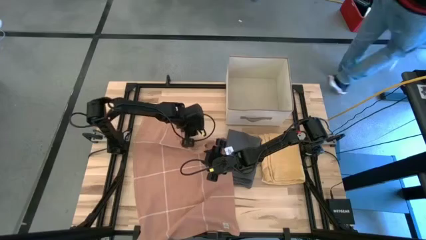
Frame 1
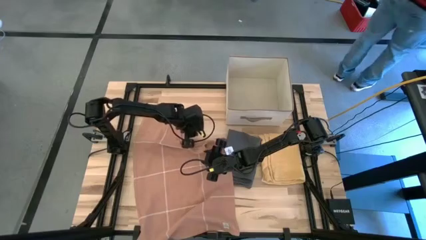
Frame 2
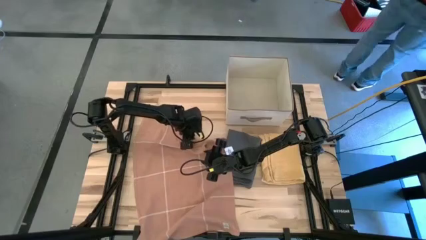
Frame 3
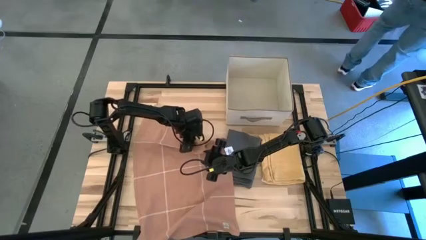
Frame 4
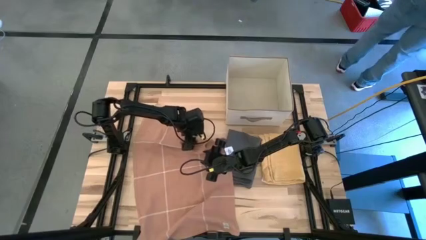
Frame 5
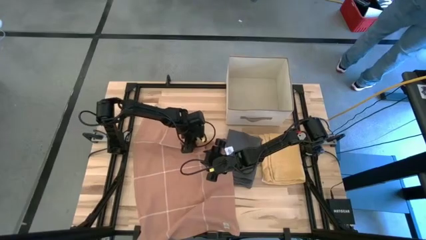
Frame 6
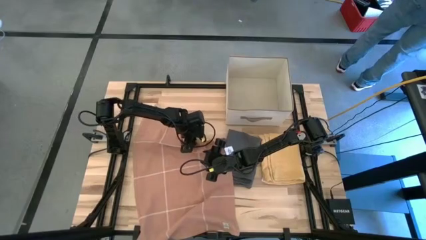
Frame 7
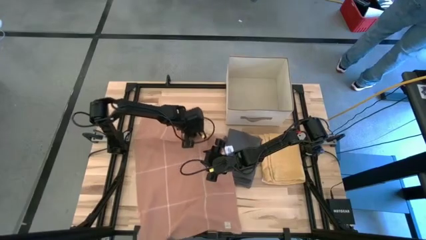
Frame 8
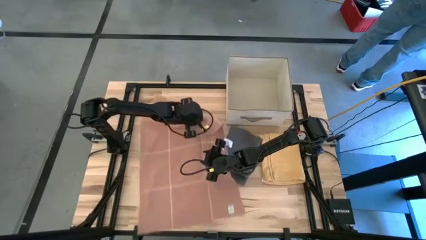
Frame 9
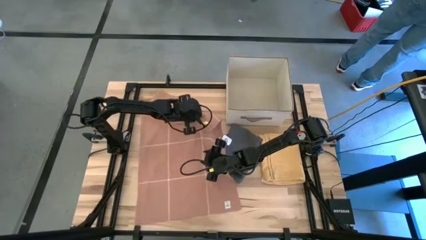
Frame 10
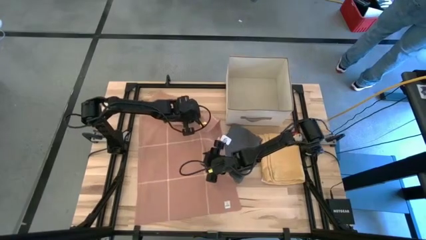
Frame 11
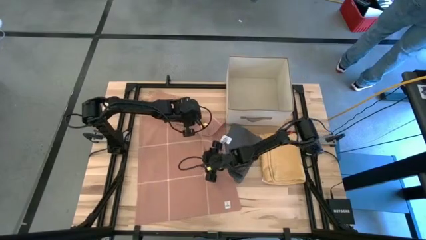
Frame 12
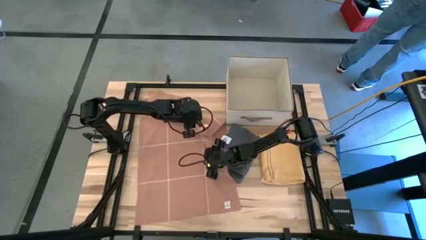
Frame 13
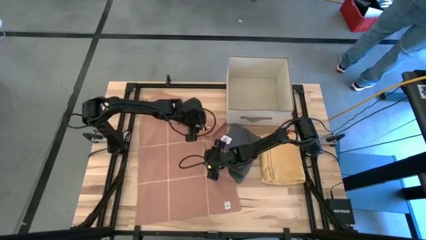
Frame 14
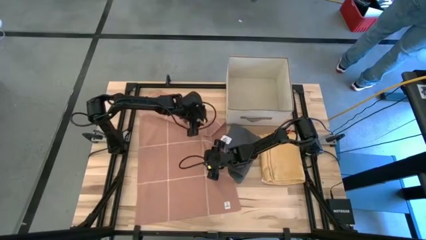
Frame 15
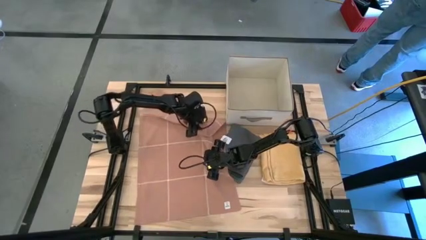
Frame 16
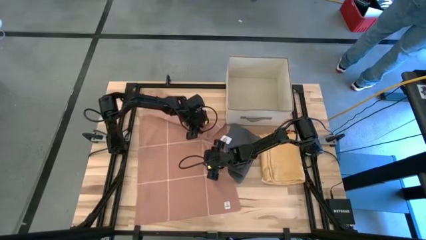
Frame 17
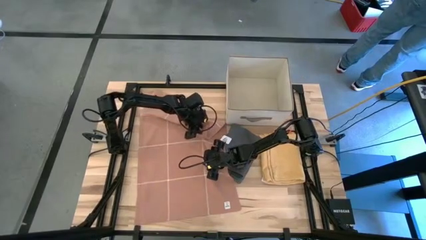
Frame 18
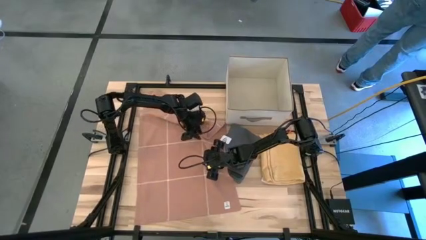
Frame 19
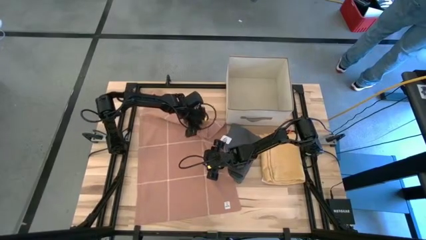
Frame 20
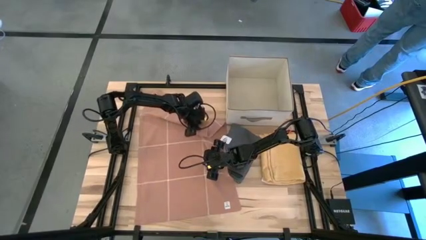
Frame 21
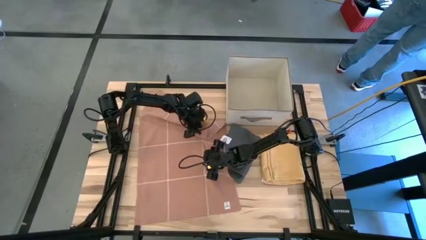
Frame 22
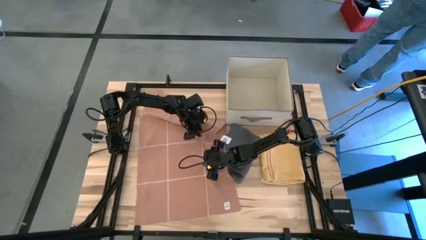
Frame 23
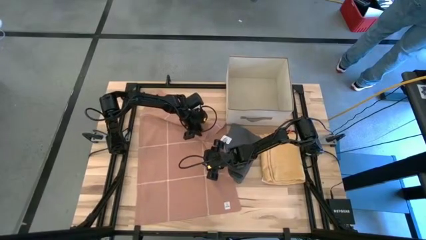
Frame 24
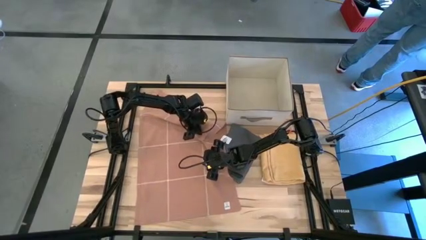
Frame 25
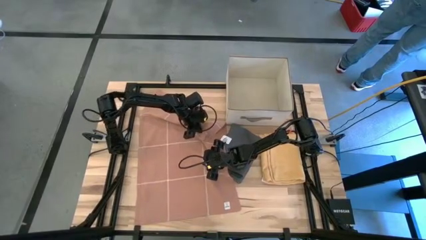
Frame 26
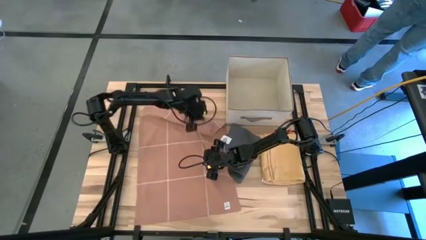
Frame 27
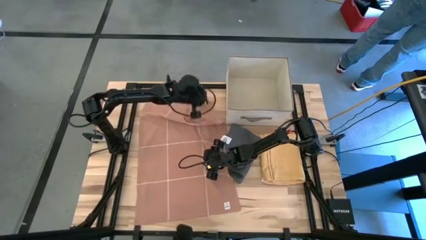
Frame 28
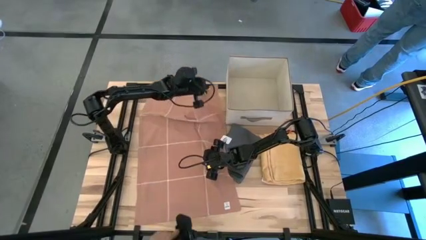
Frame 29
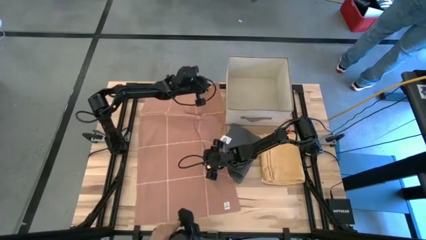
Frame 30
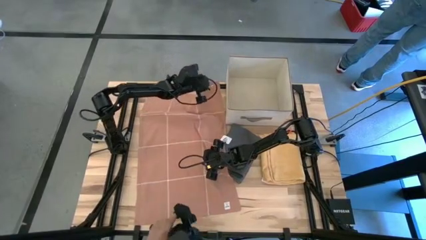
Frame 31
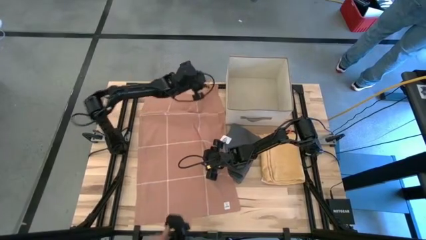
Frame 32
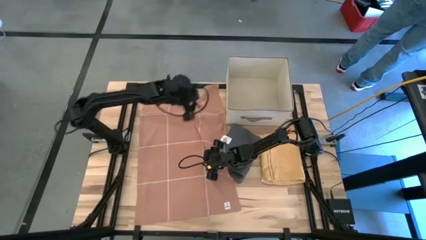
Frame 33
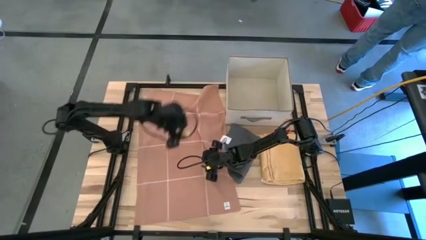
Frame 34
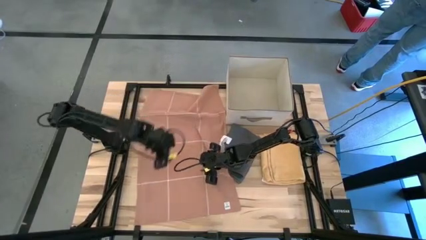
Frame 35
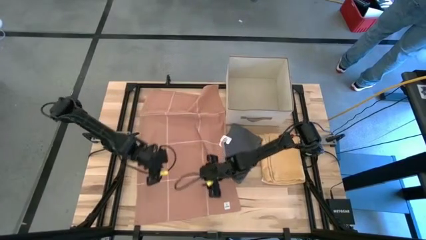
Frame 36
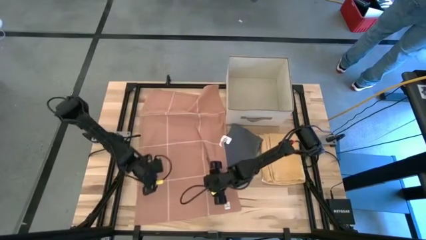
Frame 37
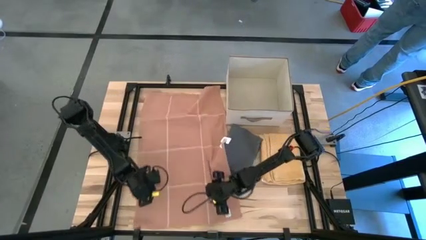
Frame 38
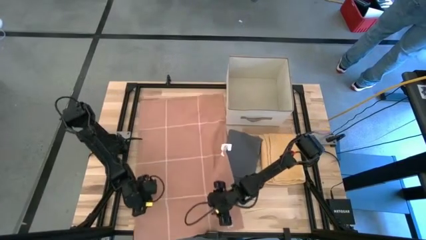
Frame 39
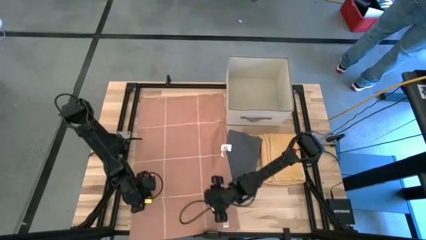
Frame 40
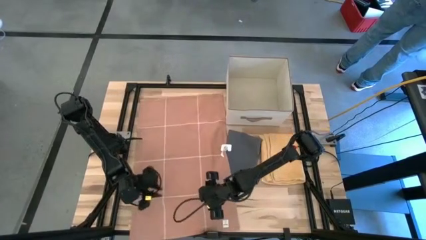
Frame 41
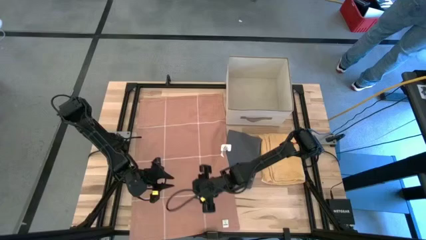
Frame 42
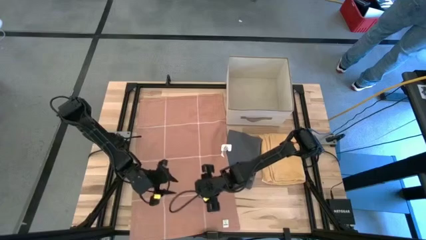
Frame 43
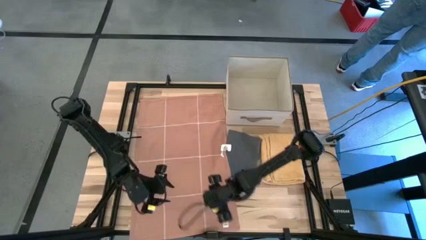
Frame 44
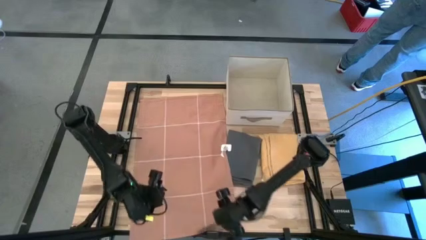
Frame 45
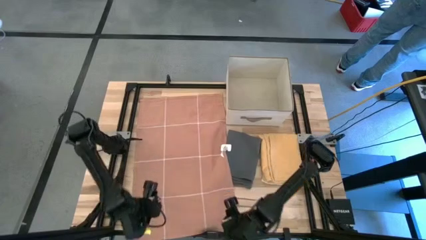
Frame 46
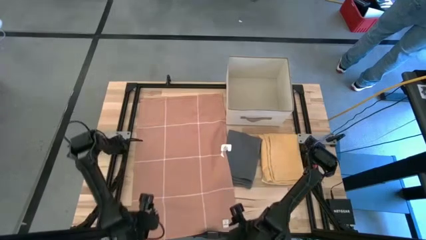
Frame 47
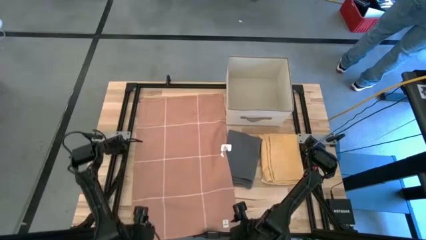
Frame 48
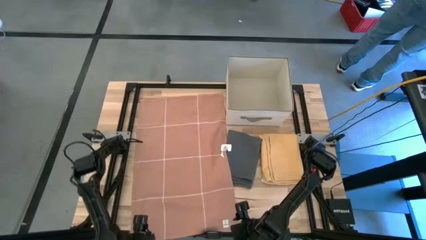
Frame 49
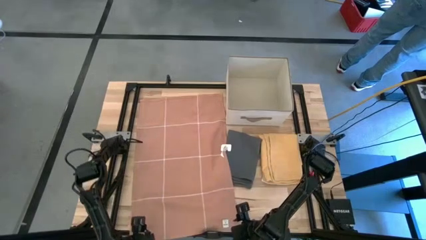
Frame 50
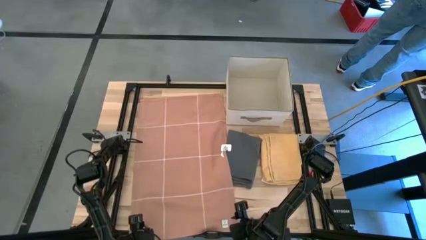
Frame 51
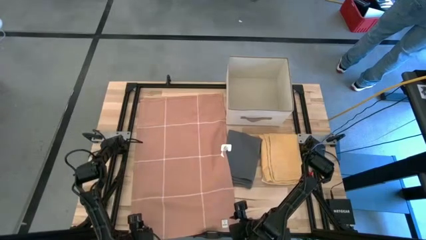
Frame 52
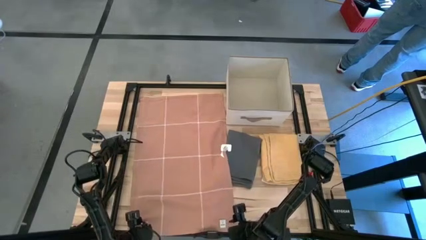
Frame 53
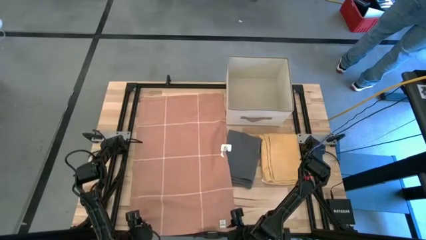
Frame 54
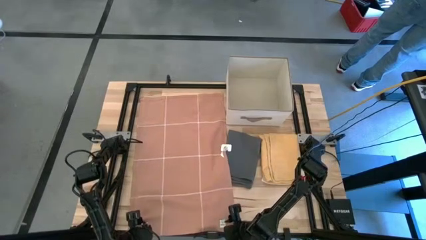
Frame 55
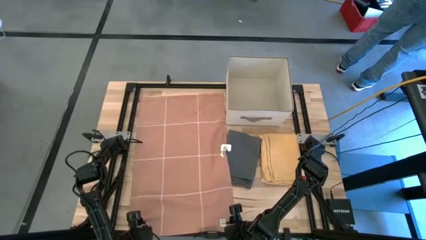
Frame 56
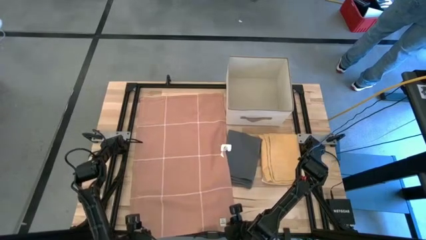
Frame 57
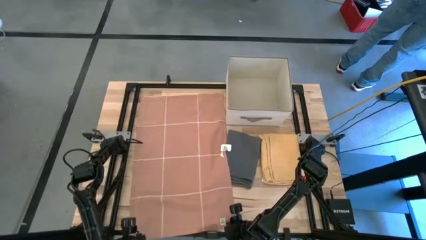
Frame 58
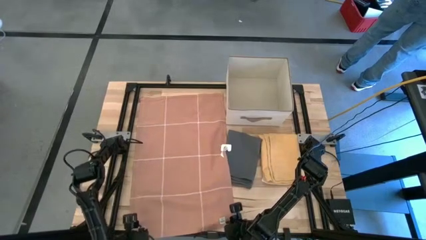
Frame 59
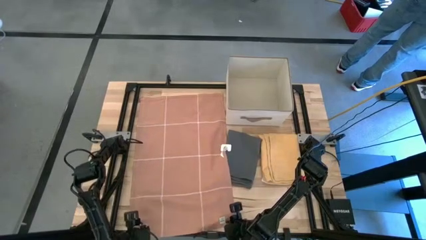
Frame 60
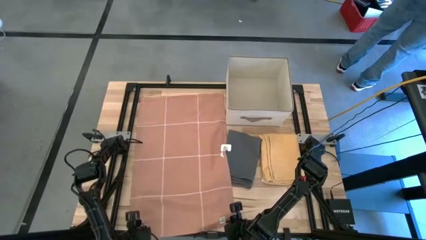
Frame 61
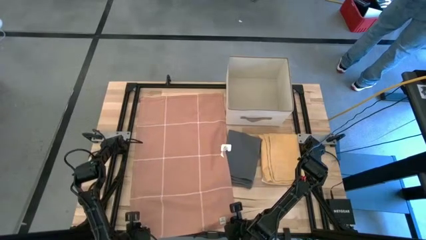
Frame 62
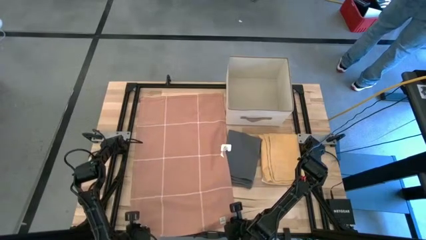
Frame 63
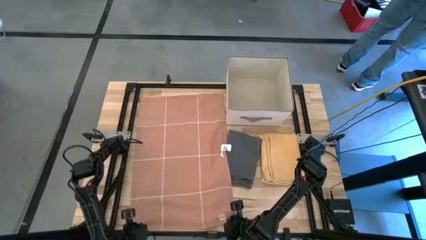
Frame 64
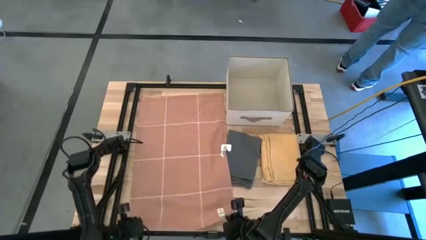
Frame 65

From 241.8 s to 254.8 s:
Task: Fold towel
Fold the brown towel

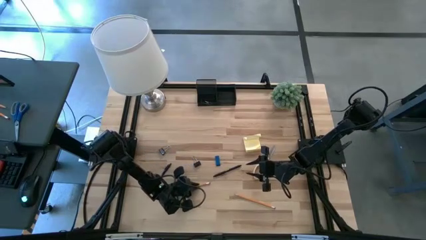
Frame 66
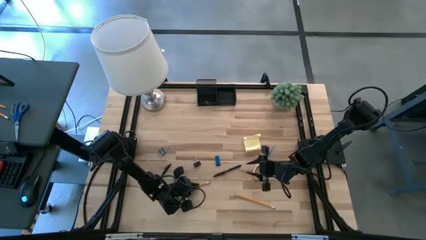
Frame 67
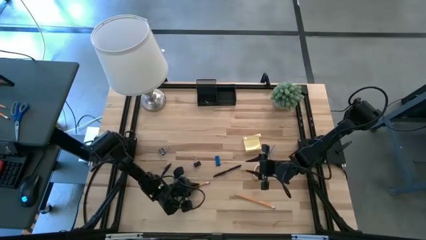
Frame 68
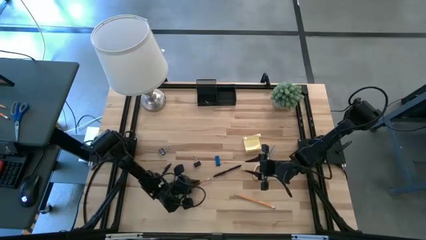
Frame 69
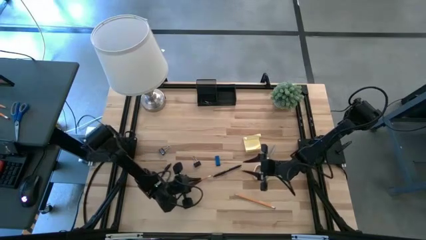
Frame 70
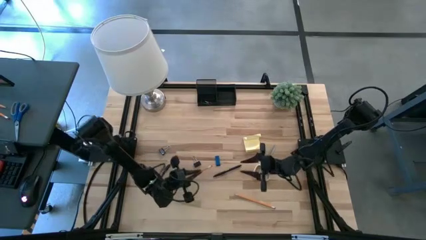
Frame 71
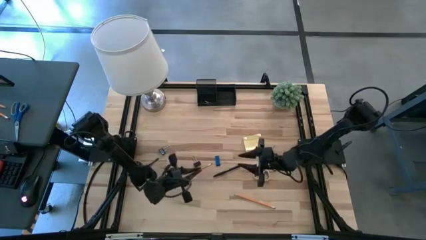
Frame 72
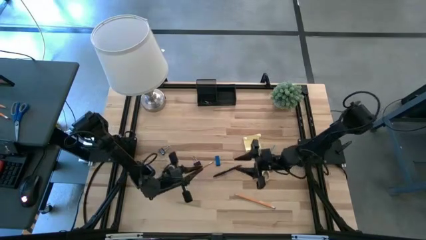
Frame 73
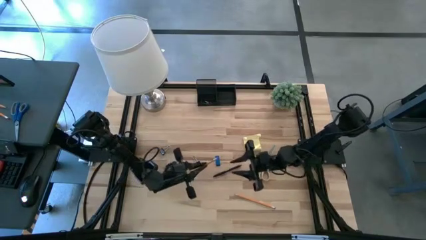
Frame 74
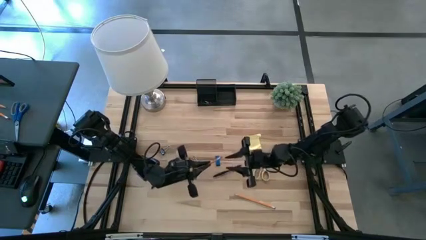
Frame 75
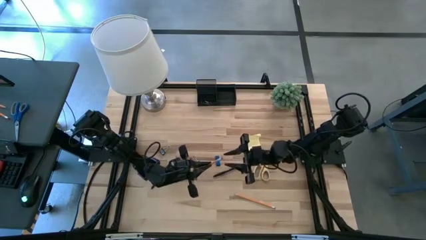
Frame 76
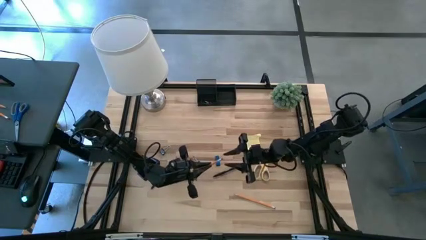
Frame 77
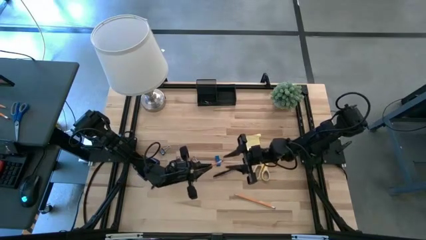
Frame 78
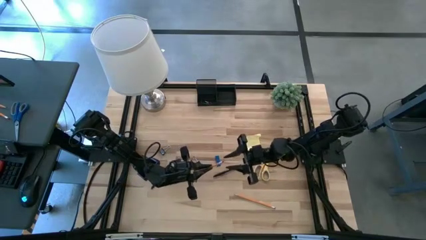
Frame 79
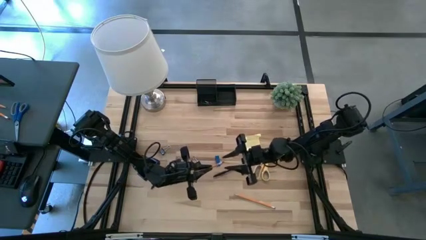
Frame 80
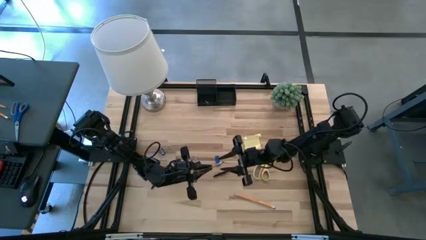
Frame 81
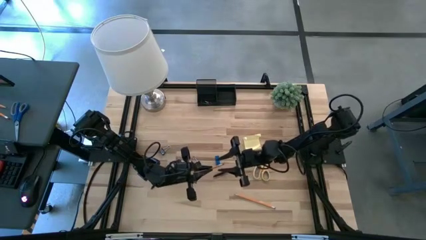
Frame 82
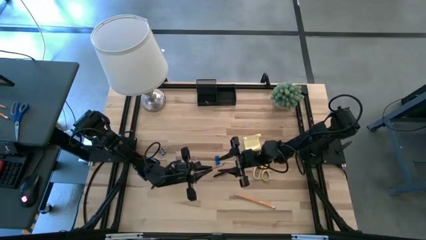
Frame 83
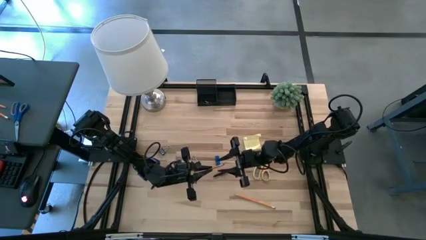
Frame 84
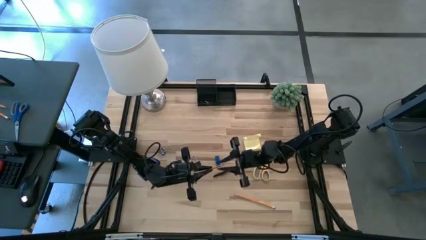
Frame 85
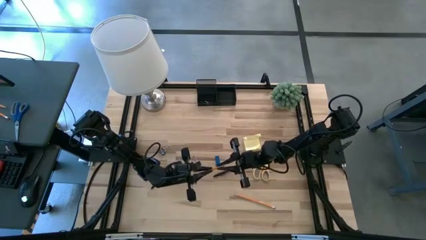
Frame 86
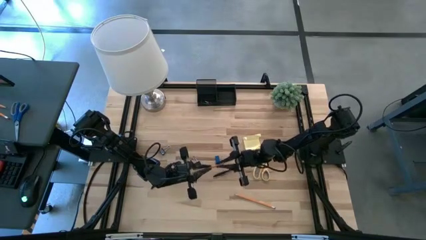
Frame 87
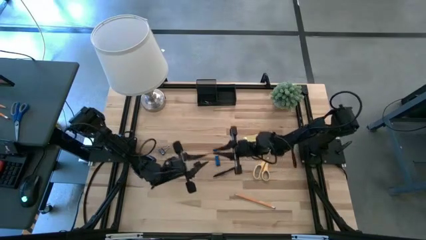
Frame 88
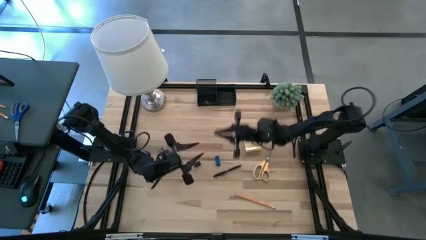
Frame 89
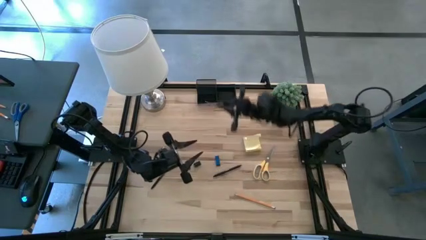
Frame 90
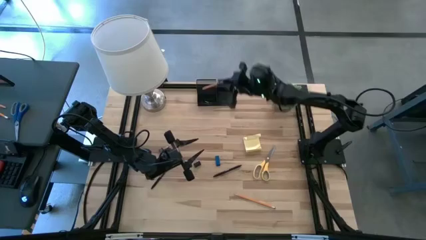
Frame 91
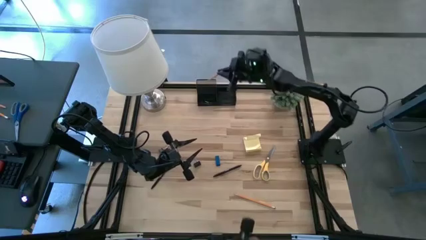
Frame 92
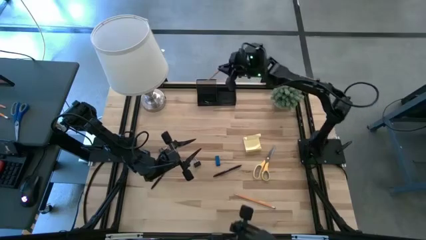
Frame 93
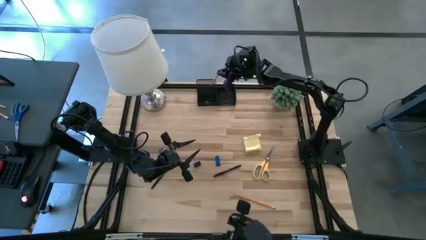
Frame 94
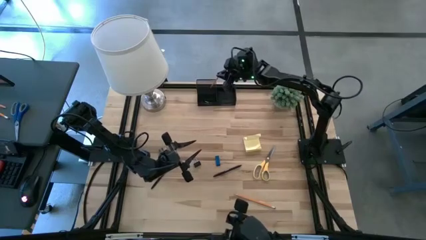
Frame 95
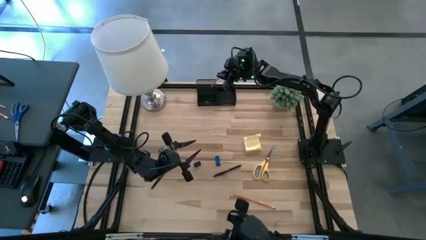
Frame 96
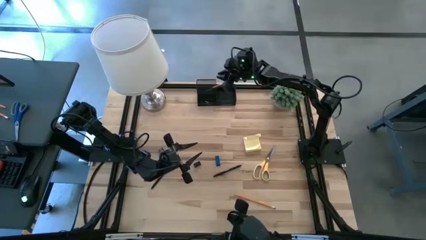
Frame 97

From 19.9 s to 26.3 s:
Task: Pick and place office supplies into organizer
Put the left orange pencil into the black desk organizer
